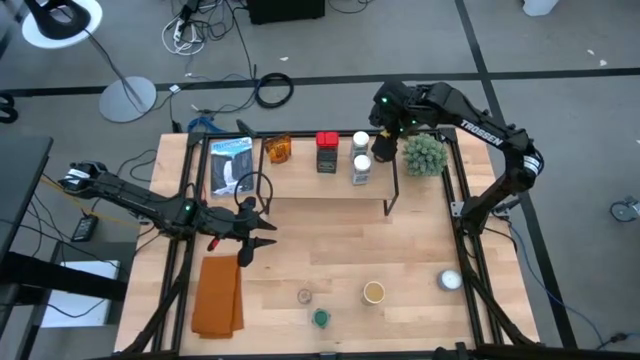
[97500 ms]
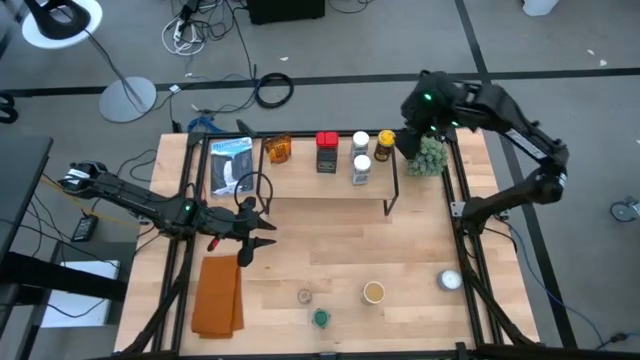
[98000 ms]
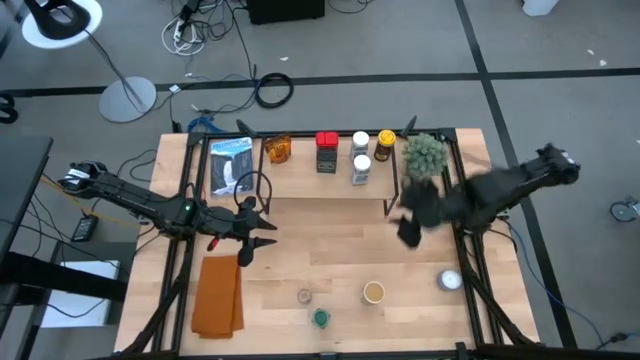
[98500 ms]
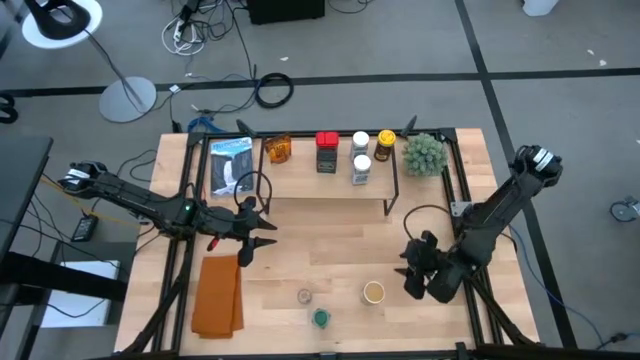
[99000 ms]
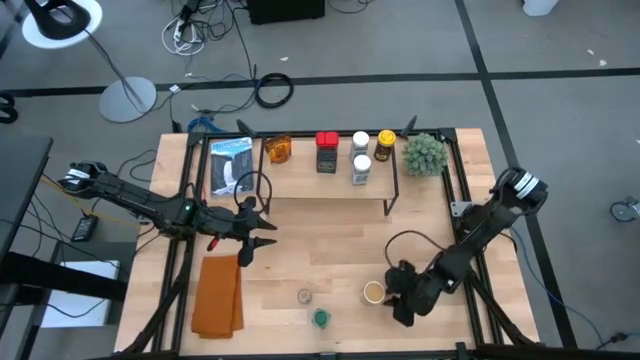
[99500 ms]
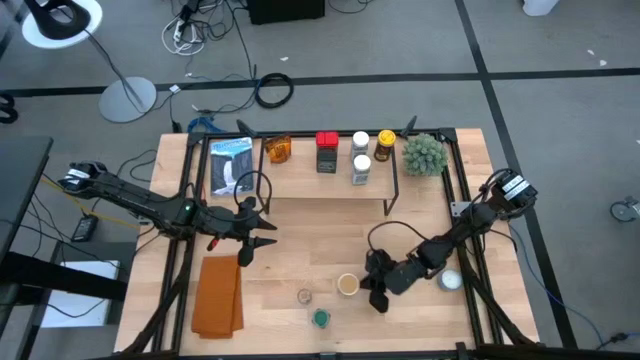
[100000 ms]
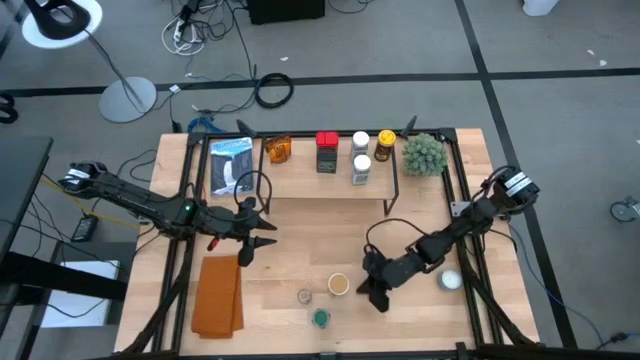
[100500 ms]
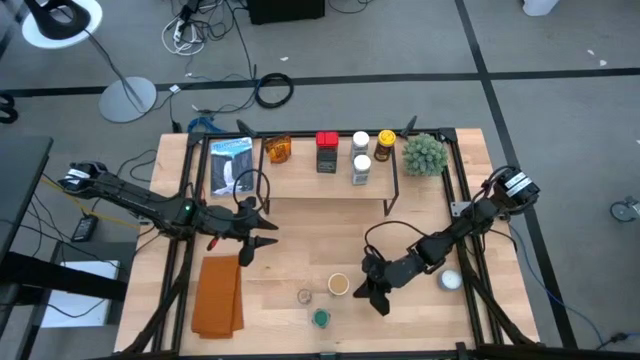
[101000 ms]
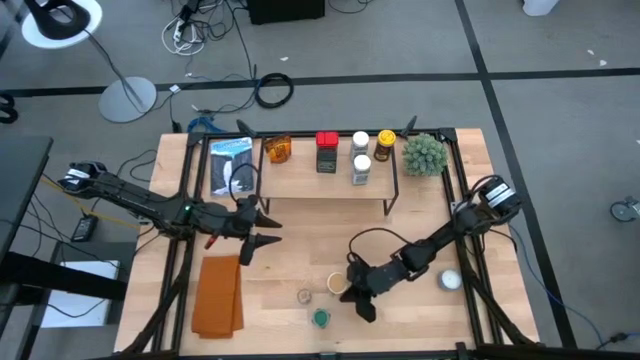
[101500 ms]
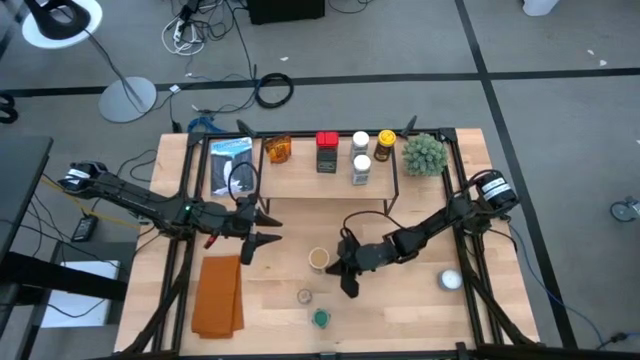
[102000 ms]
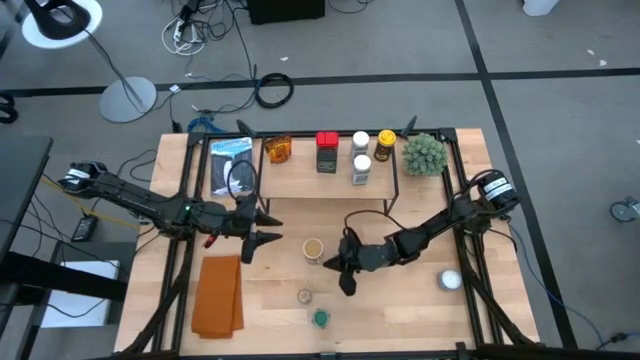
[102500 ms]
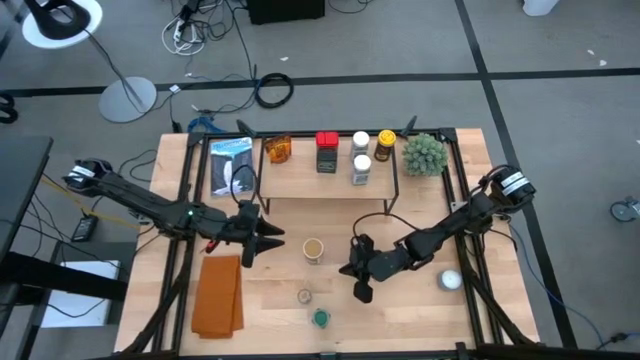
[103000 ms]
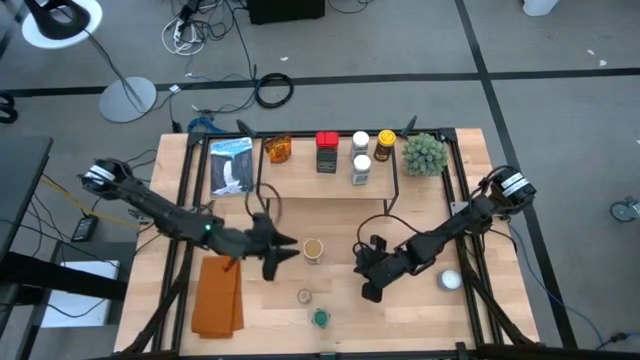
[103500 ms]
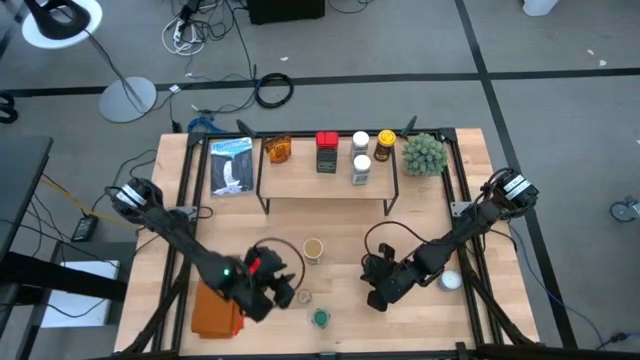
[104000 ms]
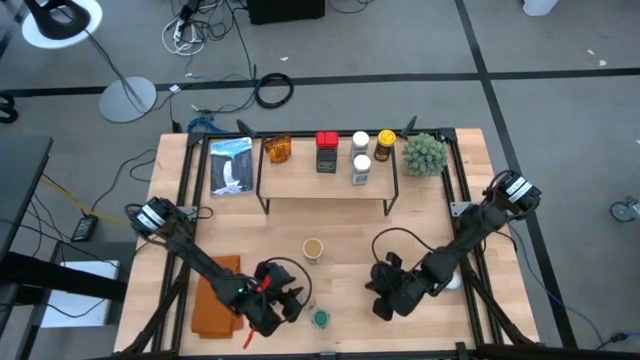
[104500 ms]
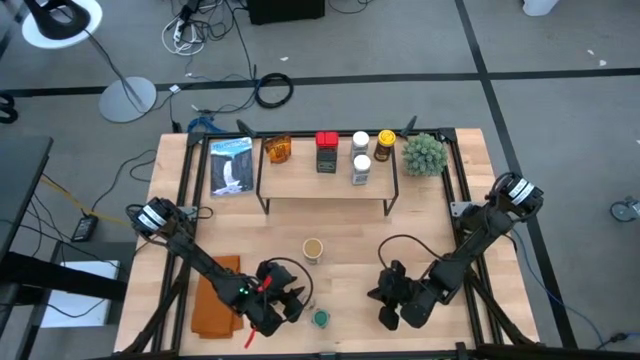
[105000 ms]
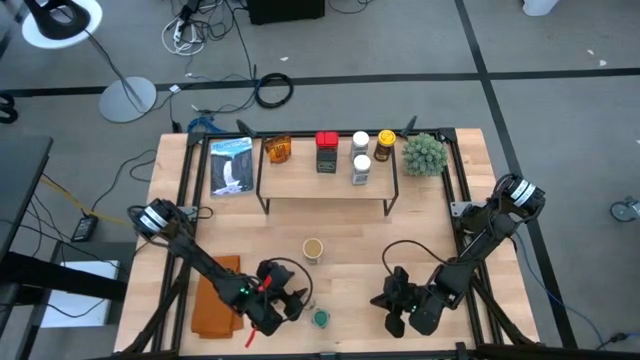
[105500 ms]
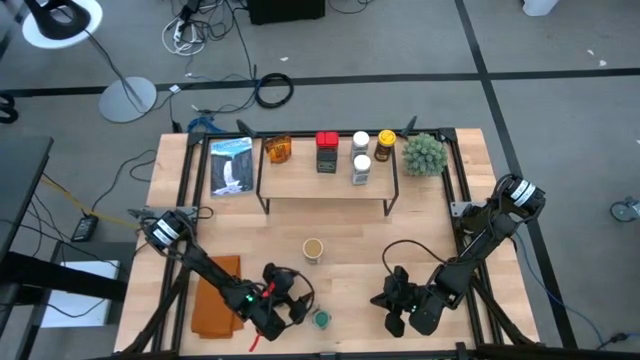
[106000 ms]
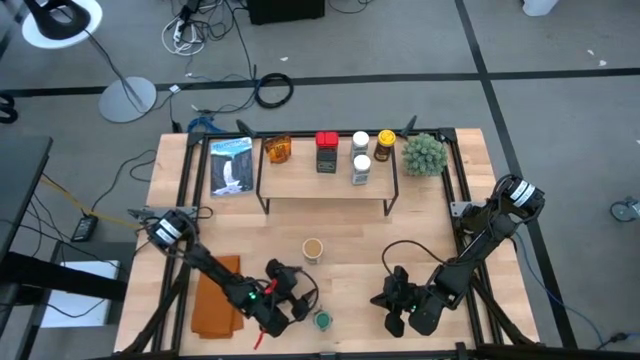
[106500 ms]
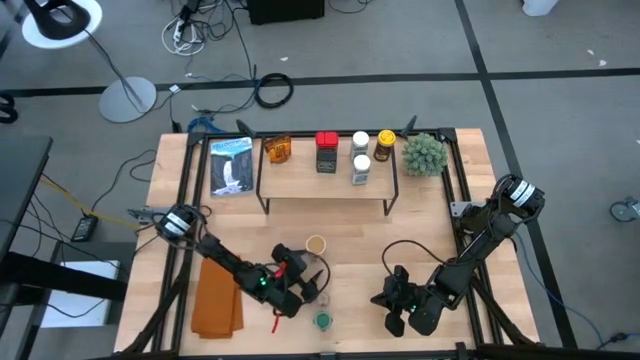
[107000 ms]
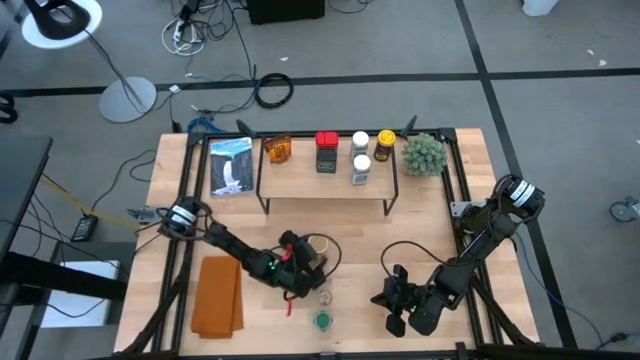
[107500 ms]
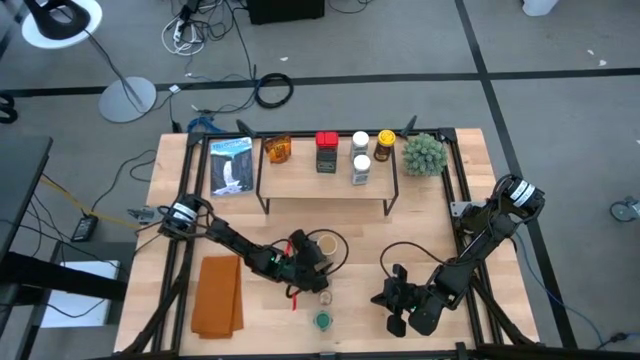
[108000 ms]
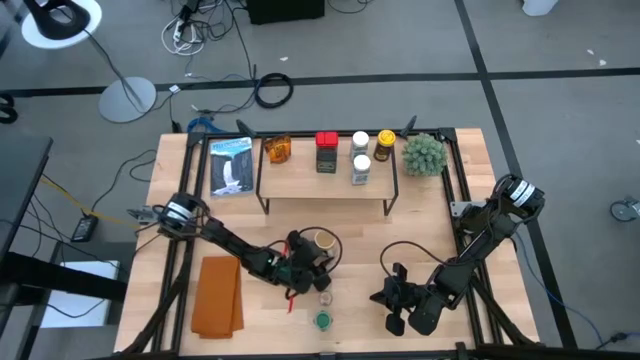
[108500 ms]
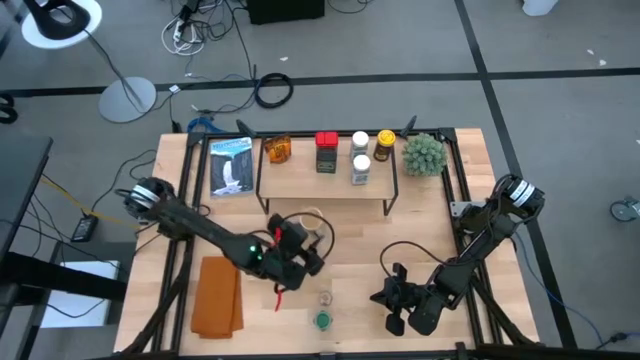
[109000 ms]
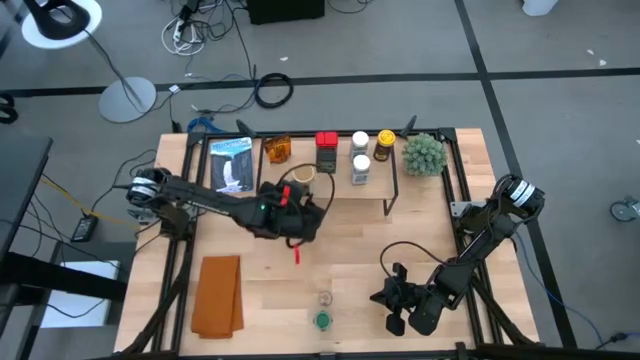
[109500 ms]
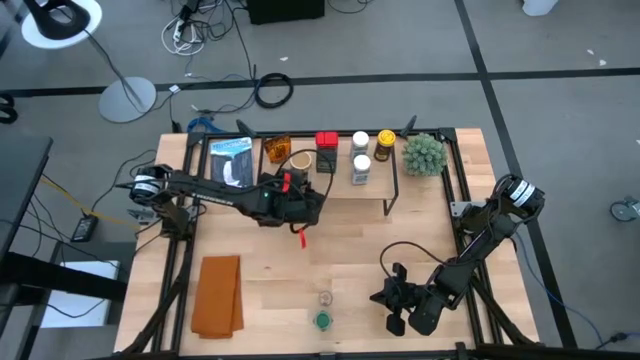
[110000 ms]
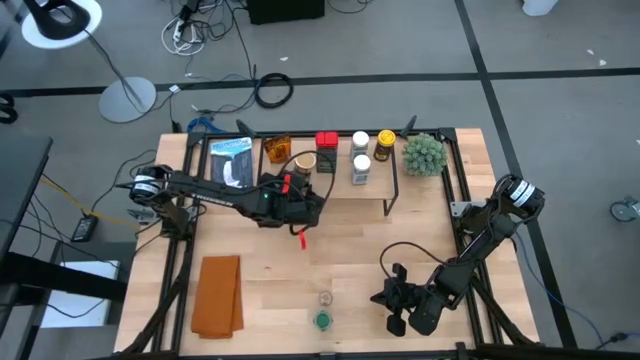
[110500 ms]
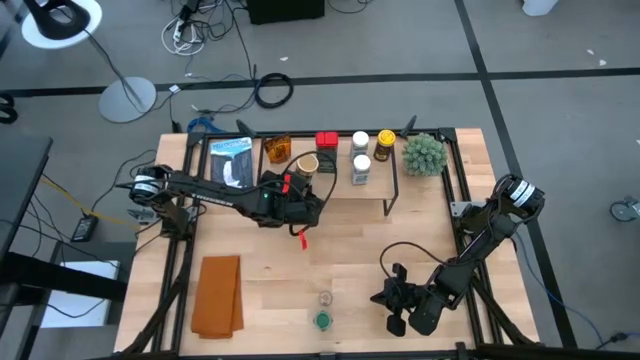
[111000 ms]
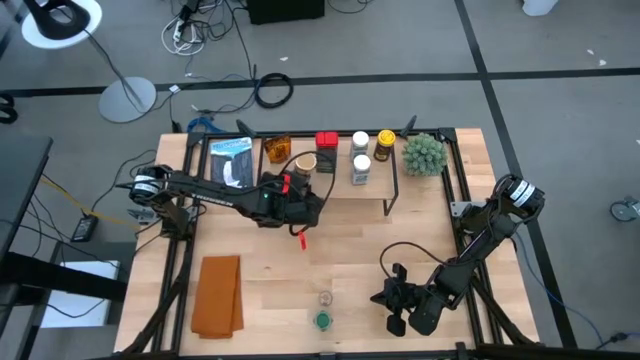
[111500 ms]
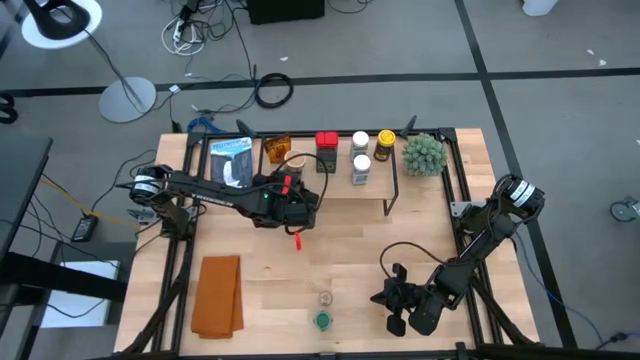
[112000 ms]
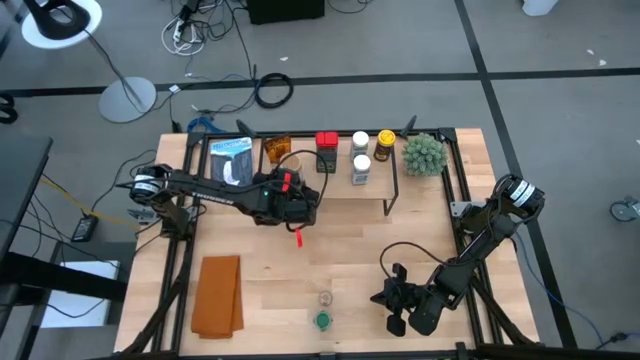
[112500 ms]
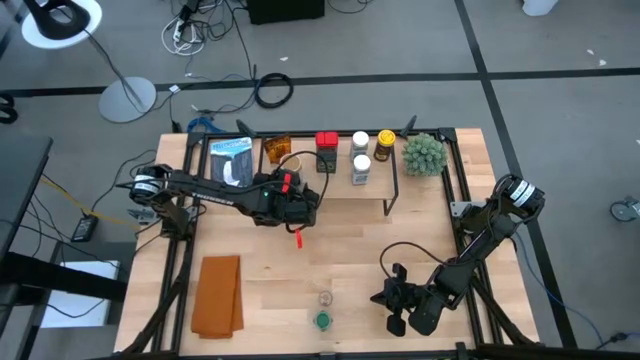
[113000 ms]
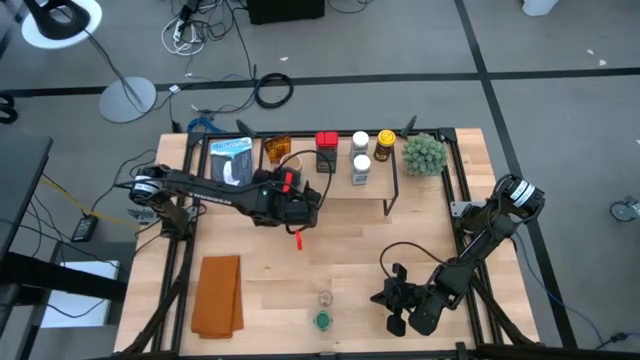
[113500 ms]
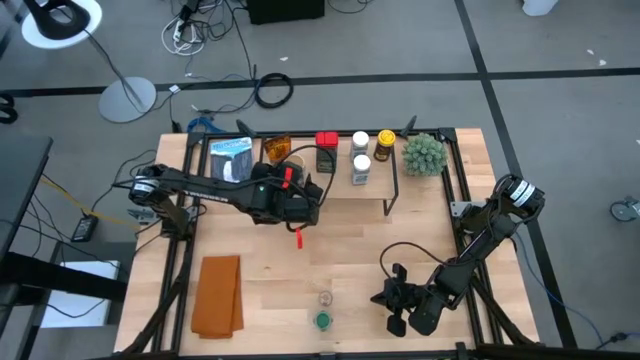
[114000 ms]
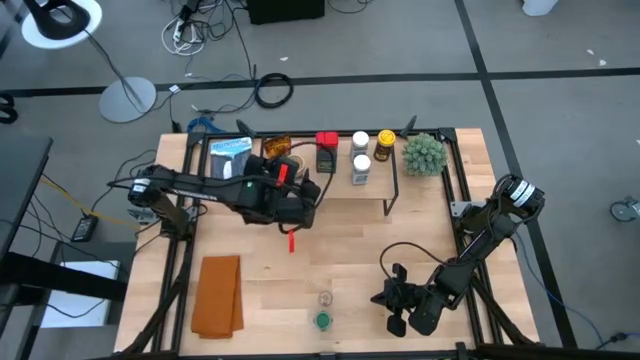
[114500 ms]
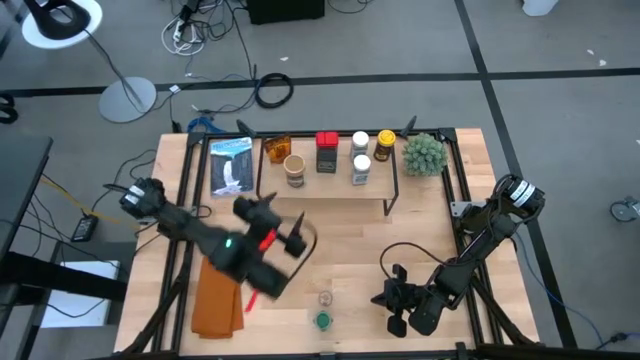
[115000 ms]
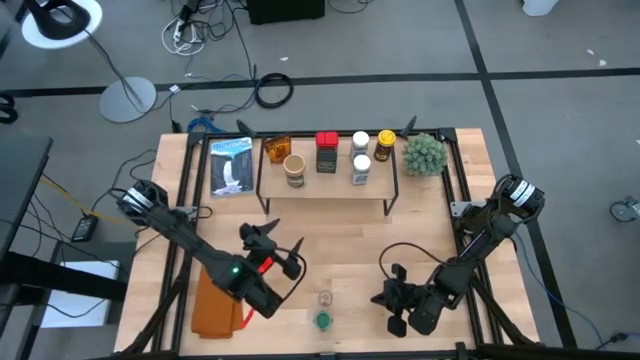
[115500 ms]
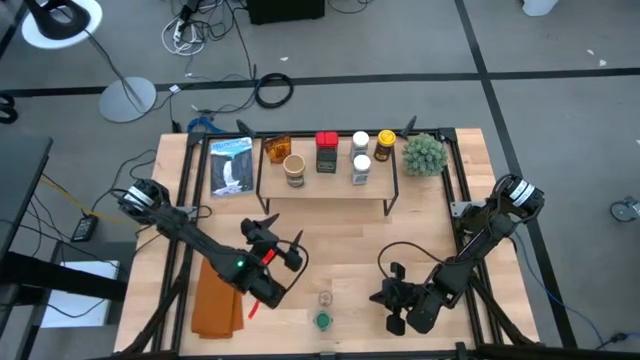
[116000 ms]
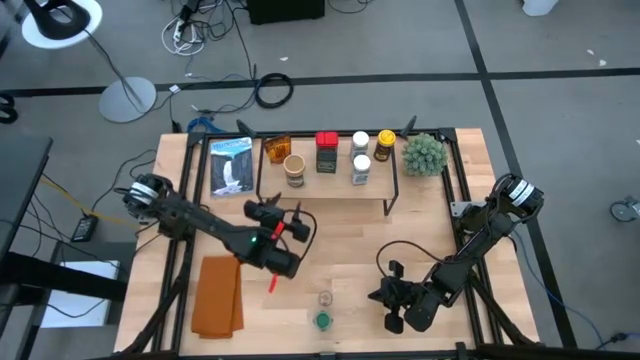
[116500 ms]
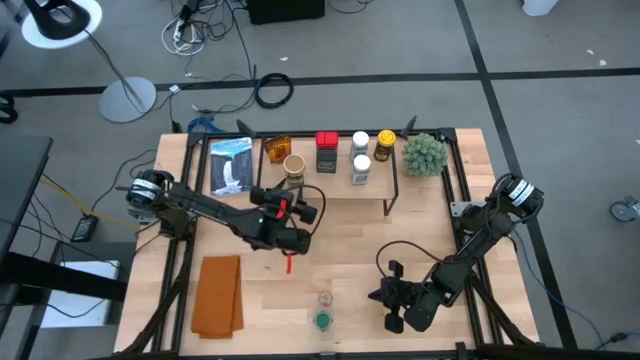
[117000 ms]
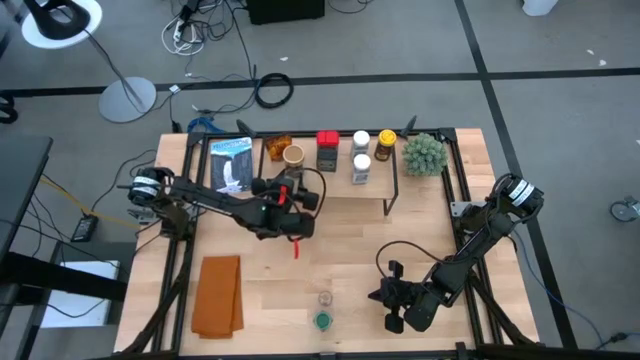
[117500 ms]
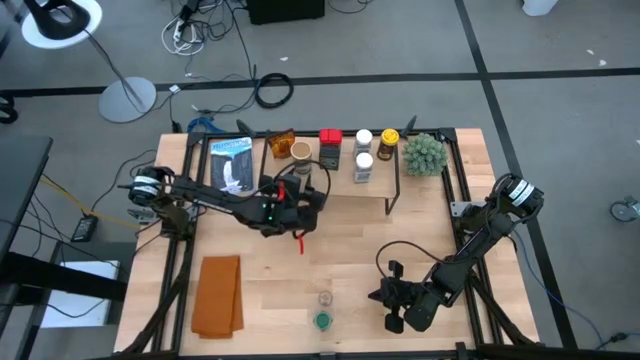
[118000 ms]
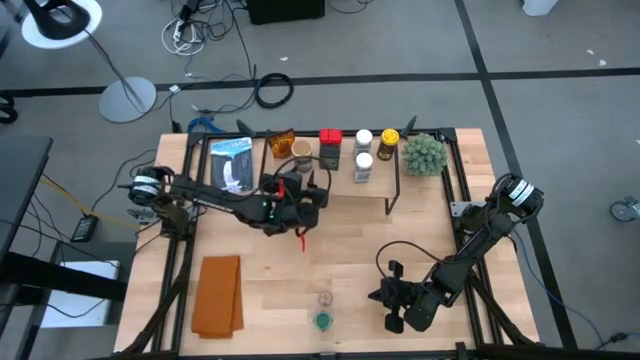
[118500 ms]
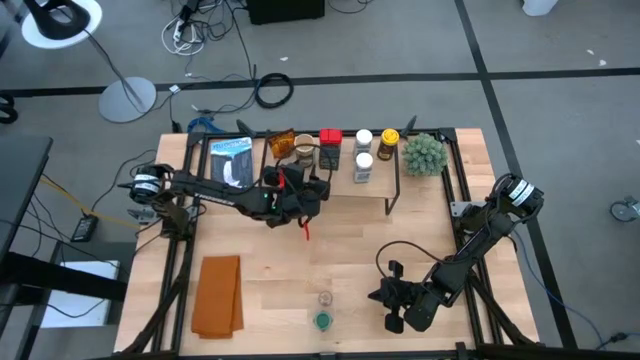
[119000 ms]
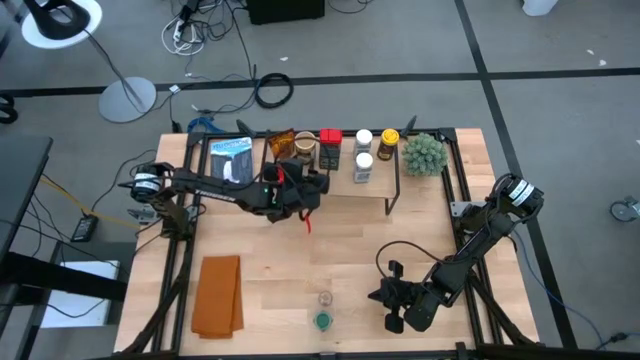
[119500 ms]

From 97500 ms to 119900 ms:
Task: Shelf spices
Put the gold seasoning bottle on the shelf
